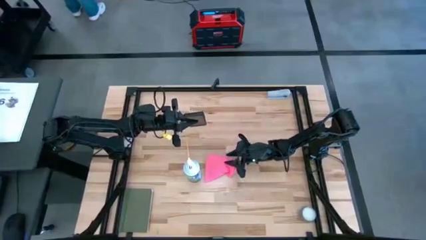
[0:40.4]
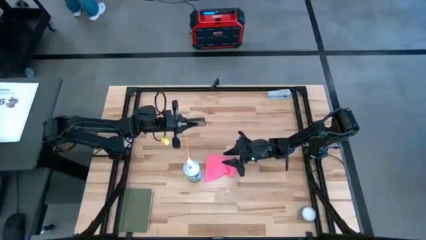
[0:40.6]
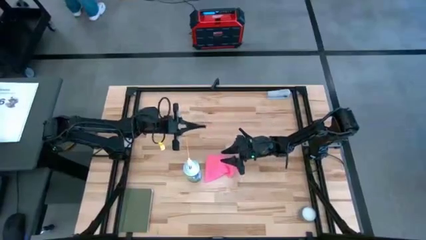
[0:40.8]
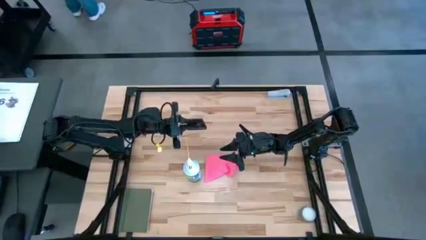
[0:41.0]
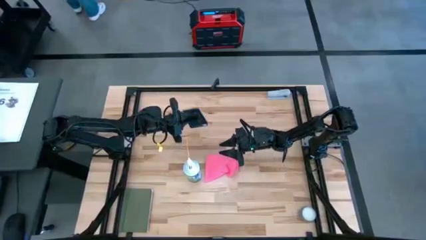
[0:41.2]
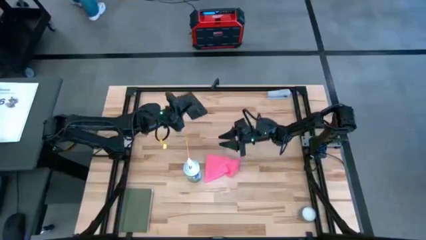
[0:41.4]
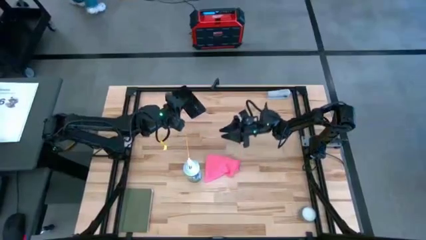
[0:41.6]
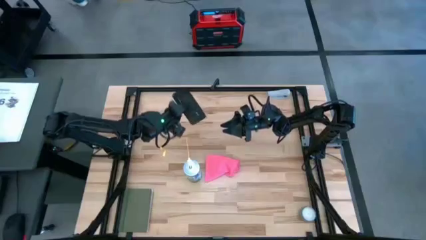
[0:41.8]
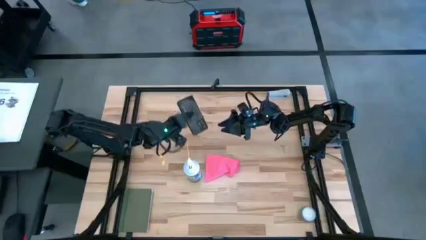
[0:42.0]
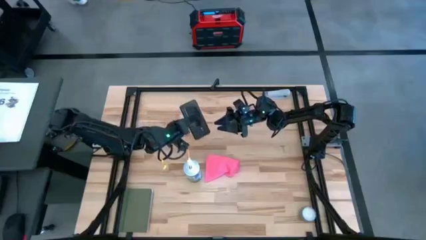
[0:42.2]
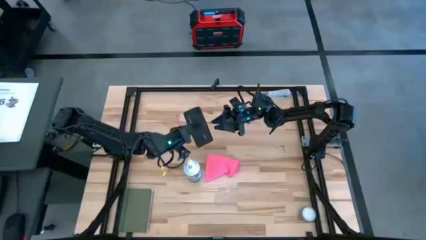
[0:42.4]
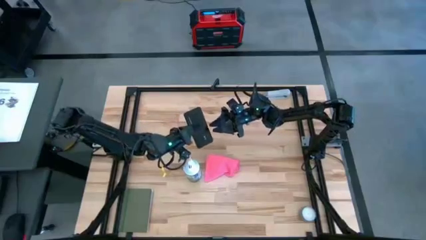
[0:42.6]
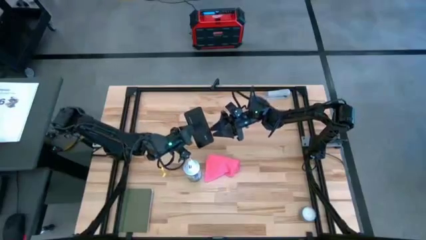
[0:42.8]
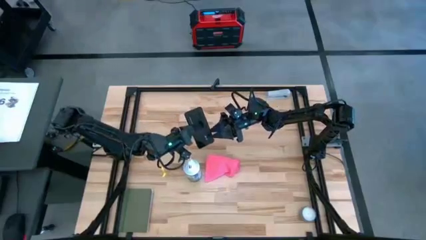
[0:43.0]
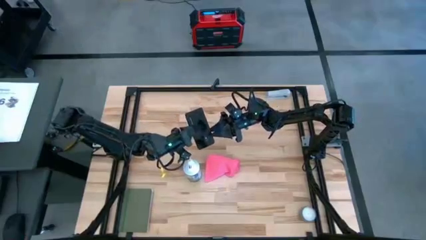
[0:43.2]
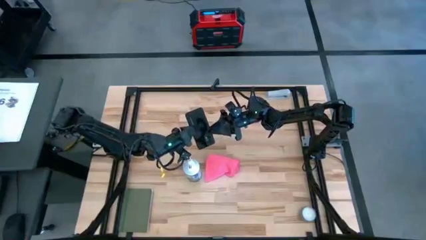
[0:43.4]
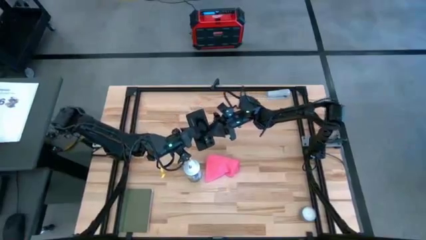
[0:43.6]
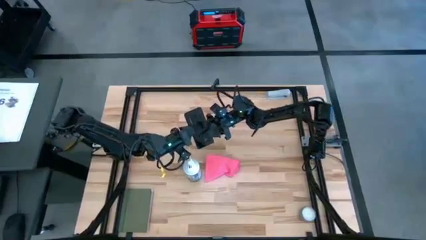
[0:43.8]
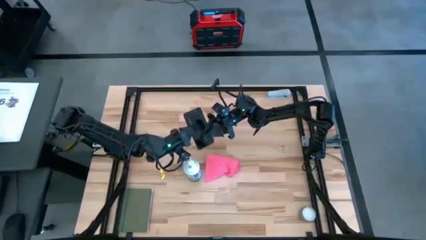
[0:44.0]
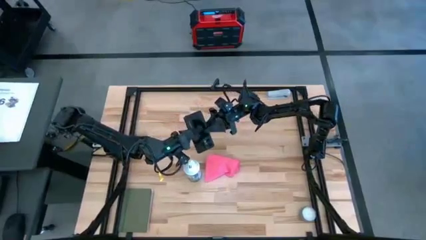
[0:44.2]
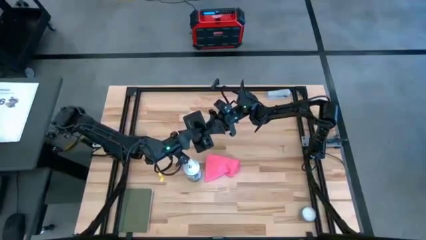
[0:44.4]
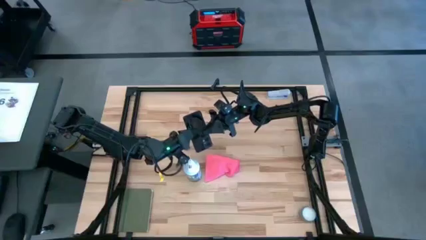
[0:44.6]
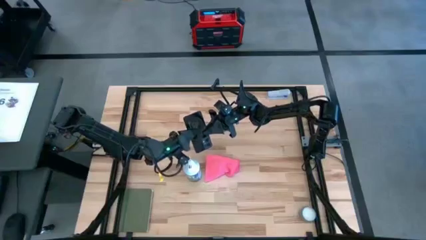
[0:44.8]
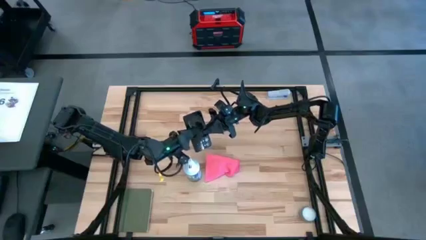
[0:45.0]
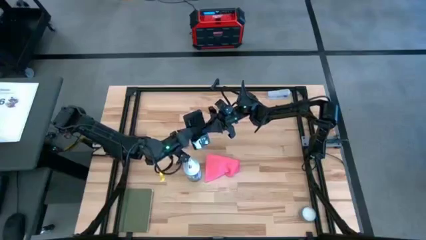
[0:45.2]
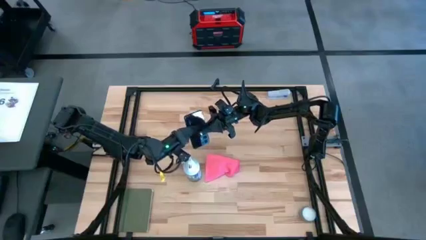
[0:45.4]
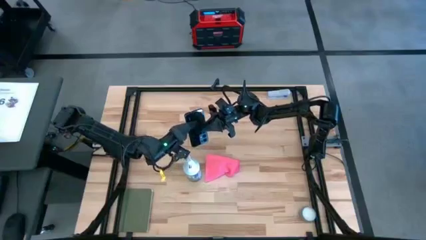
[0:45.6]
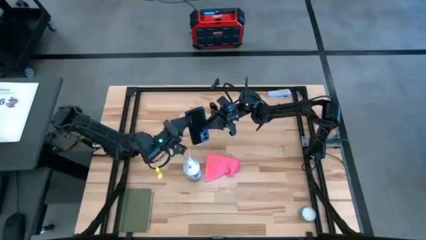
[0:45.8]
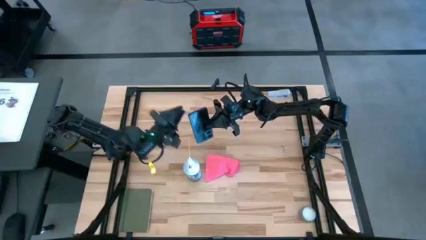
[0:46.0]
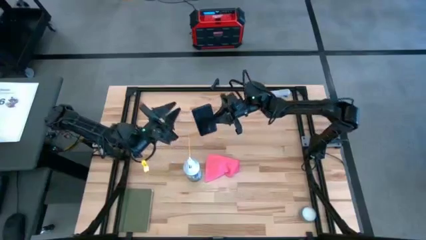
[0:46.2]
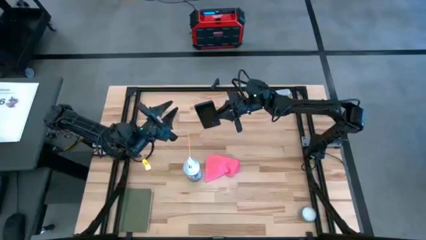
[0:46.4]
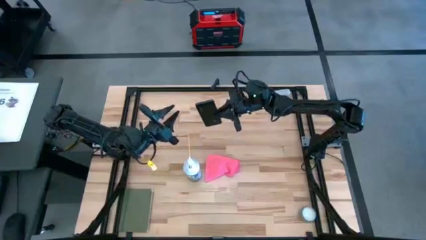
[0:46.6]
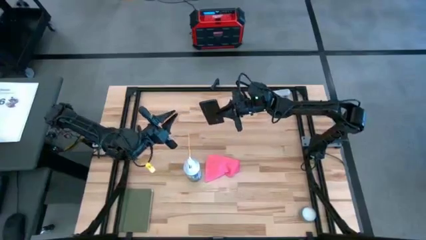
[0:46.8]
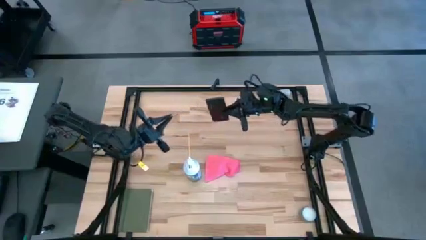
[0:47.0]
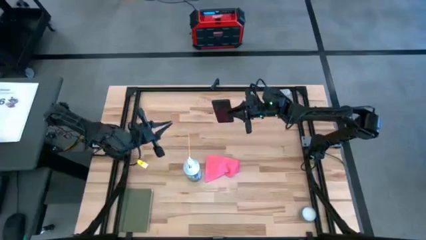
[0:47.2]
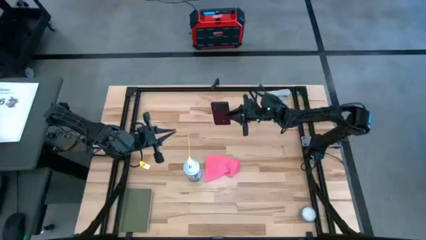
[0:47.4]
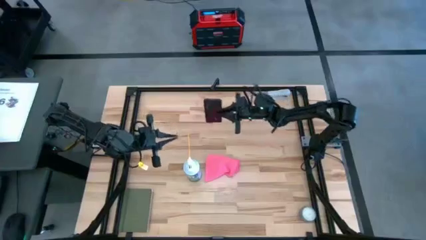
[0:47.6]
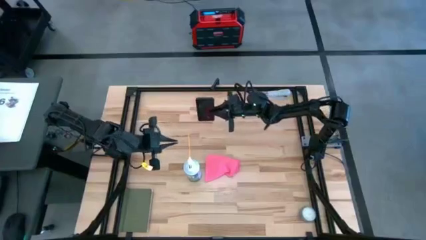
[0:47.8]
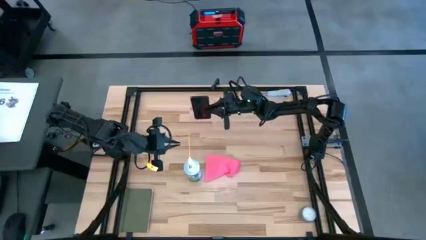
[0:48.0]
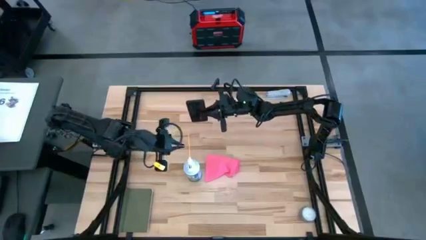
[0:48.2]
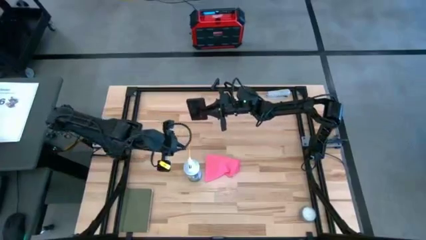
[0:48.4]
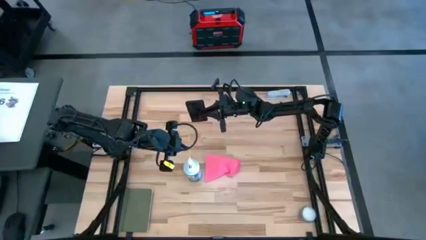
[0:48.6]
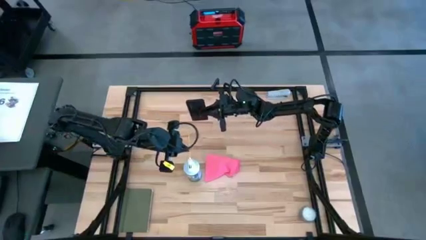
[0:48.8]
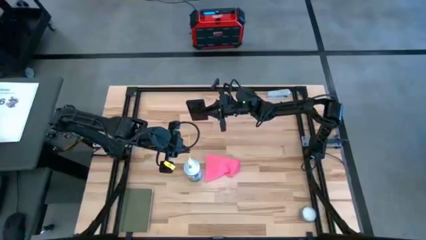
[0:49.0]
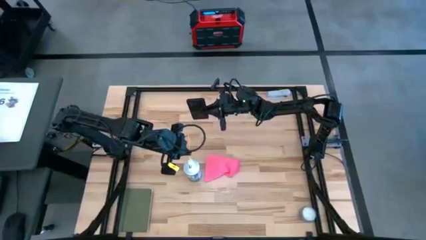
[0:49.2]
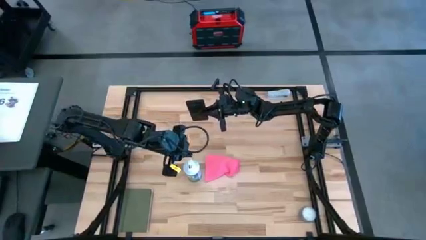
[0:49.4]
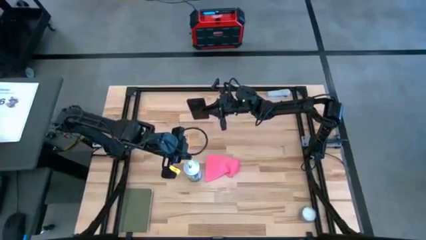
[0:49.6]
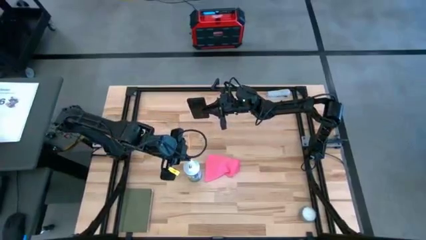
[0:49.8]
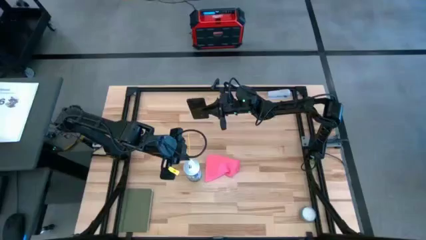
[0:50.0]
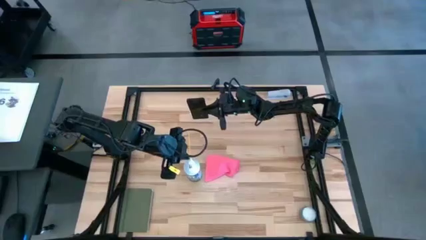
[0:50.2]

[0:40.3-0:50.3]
Task: Apply microfiber cloth
Spray the back of the cellphone with the white spray bottle
